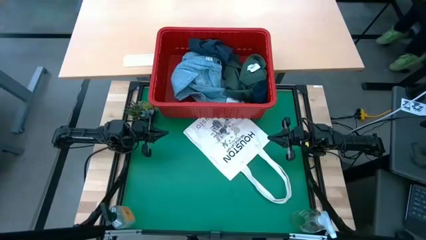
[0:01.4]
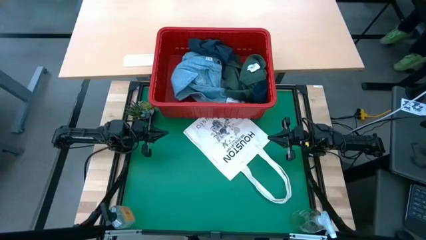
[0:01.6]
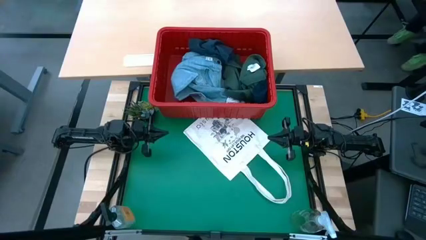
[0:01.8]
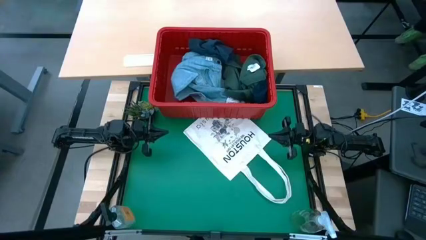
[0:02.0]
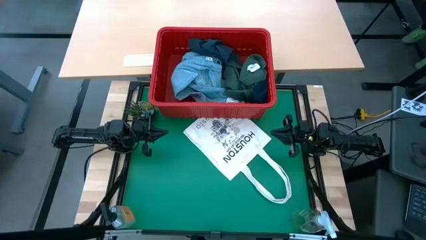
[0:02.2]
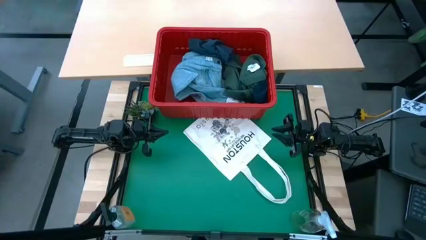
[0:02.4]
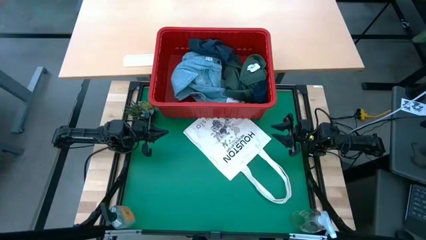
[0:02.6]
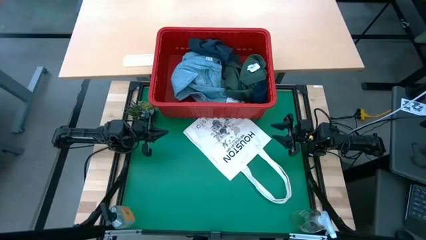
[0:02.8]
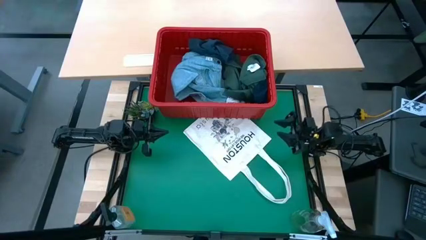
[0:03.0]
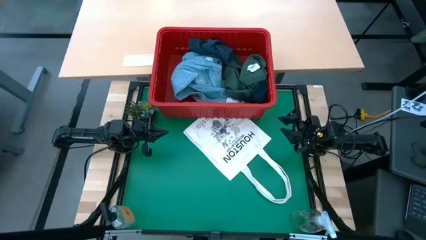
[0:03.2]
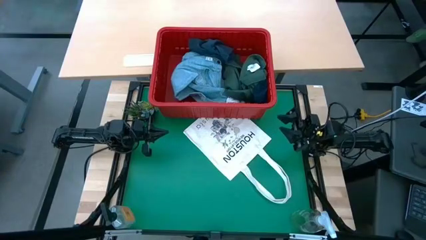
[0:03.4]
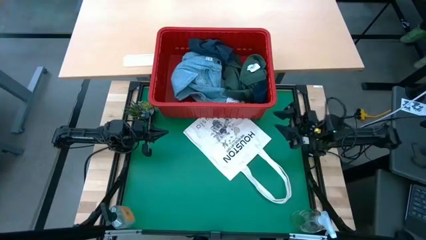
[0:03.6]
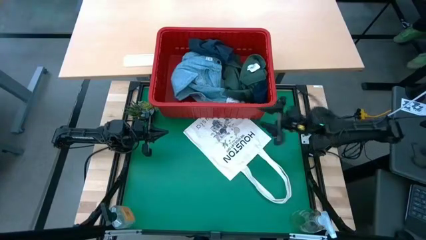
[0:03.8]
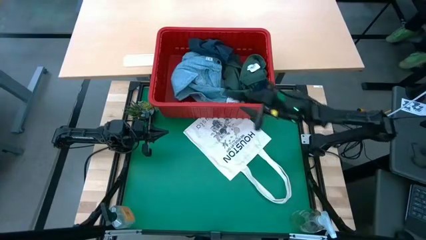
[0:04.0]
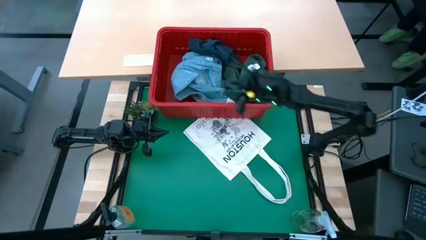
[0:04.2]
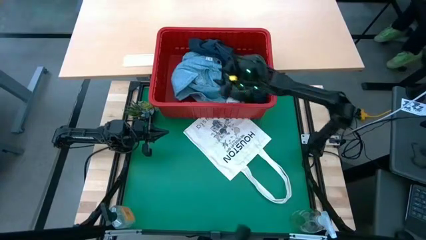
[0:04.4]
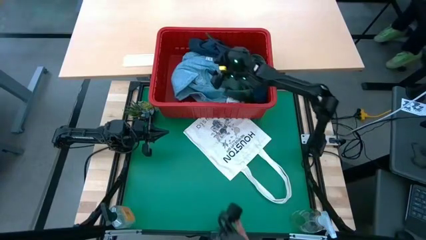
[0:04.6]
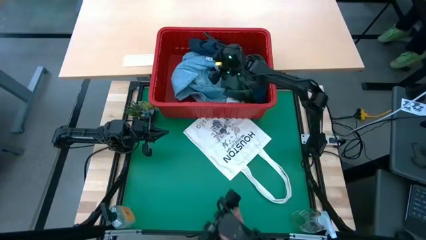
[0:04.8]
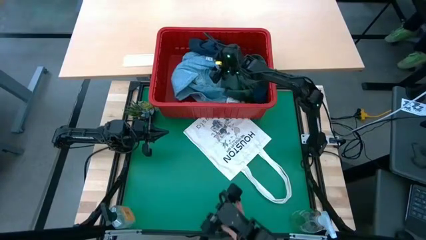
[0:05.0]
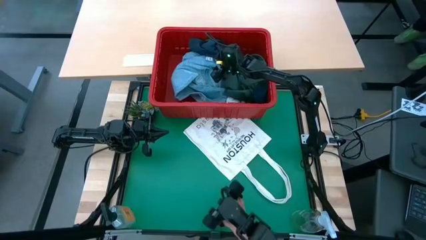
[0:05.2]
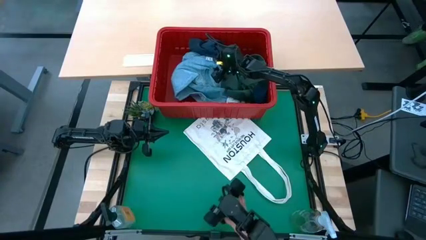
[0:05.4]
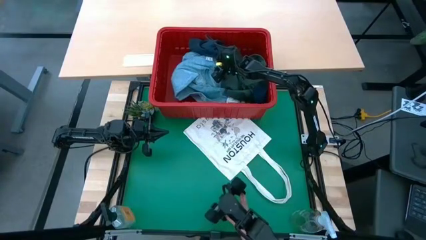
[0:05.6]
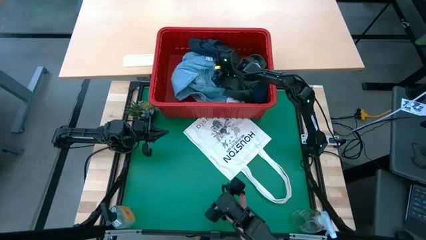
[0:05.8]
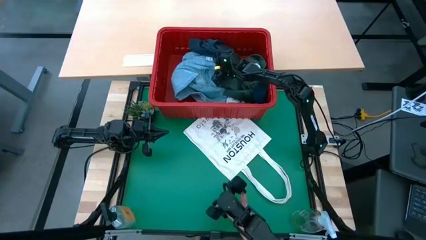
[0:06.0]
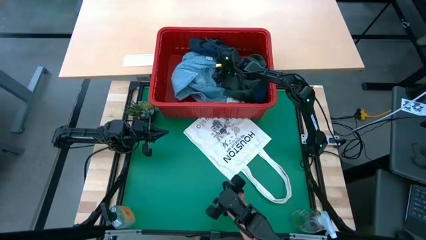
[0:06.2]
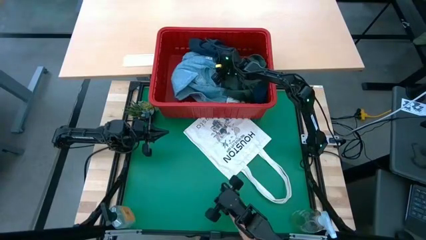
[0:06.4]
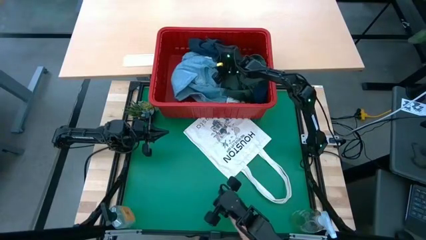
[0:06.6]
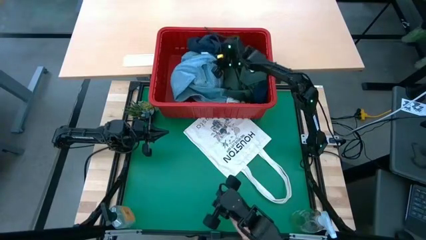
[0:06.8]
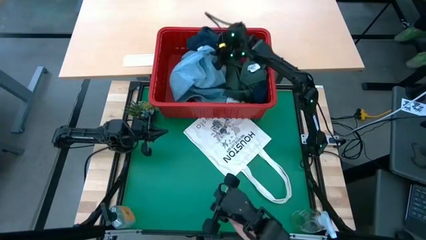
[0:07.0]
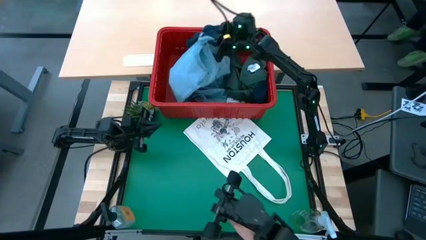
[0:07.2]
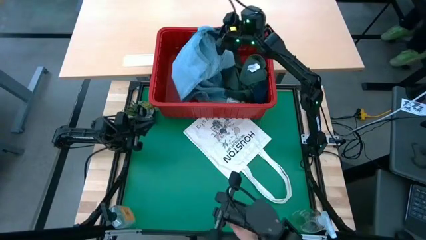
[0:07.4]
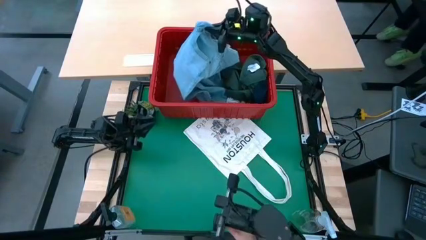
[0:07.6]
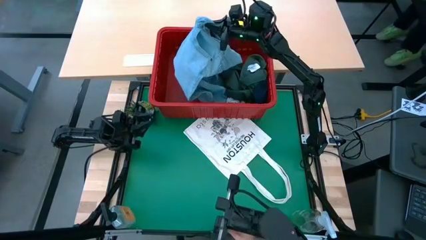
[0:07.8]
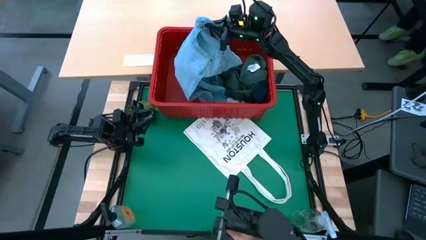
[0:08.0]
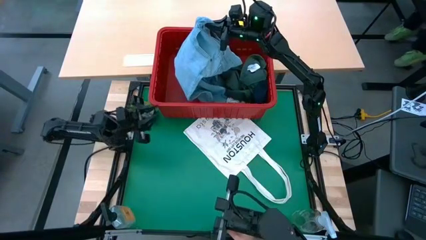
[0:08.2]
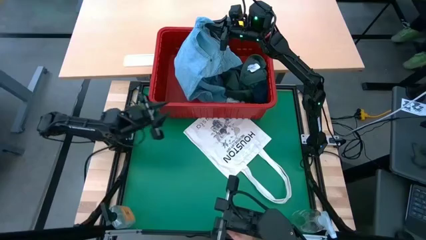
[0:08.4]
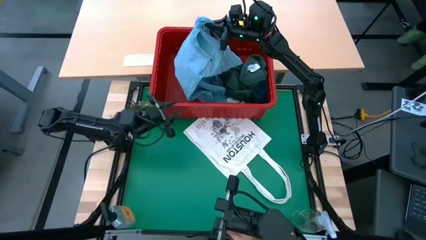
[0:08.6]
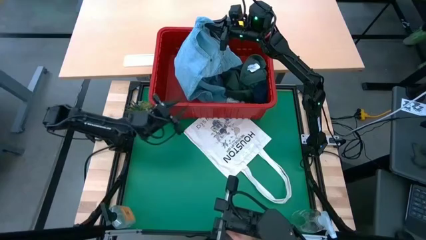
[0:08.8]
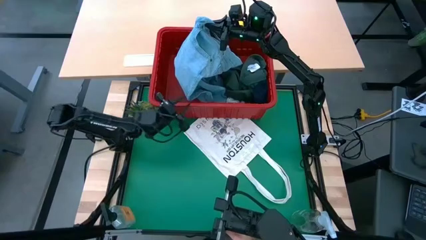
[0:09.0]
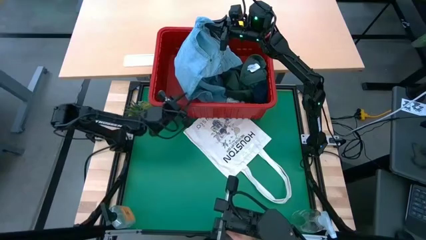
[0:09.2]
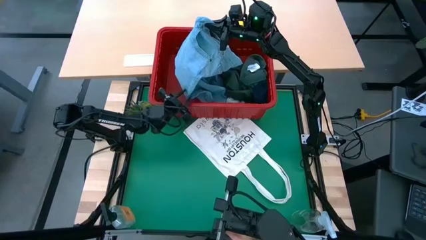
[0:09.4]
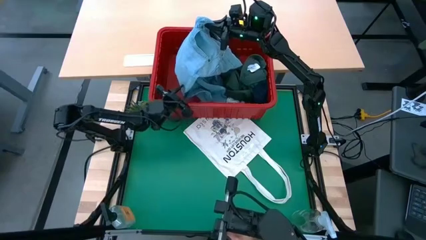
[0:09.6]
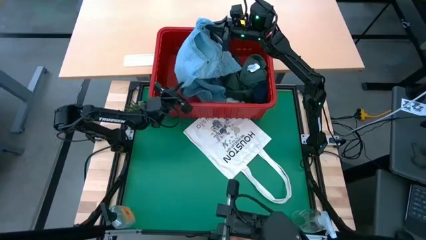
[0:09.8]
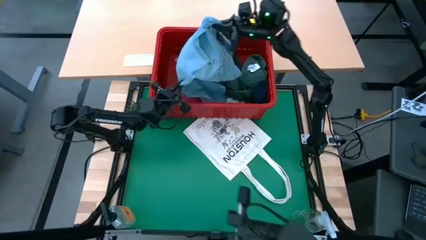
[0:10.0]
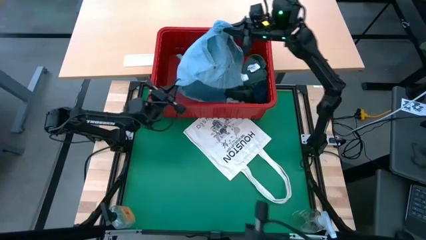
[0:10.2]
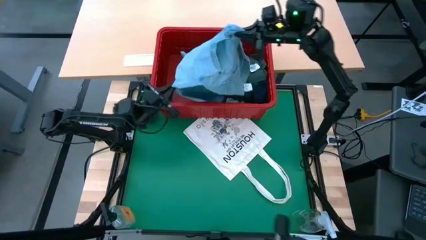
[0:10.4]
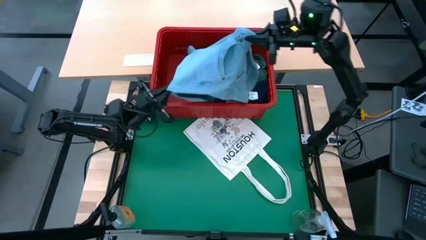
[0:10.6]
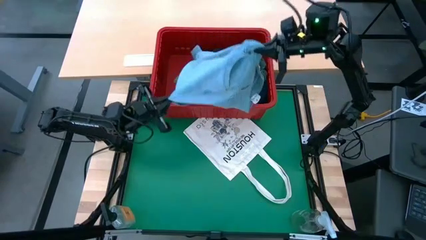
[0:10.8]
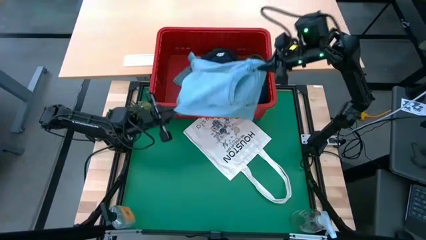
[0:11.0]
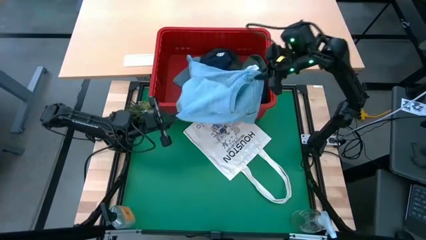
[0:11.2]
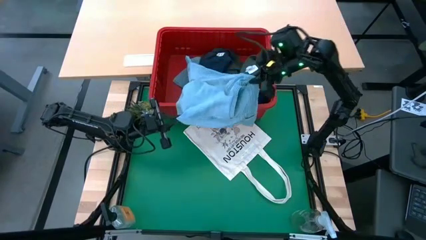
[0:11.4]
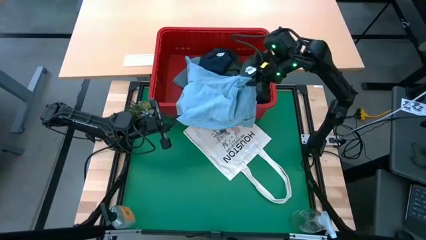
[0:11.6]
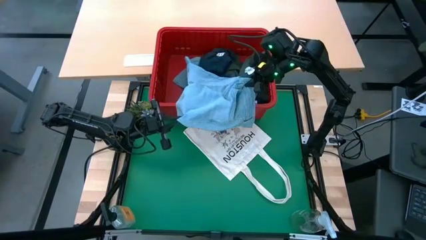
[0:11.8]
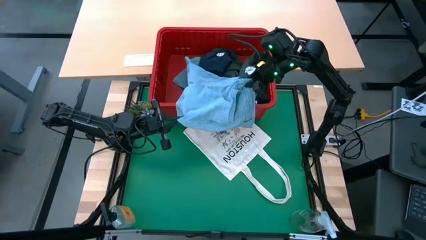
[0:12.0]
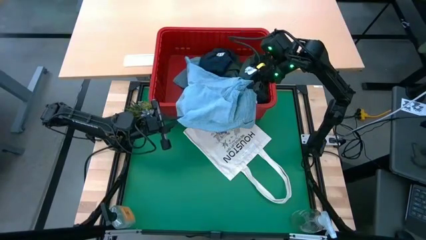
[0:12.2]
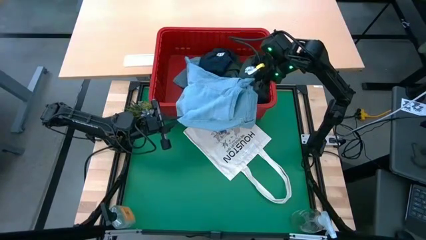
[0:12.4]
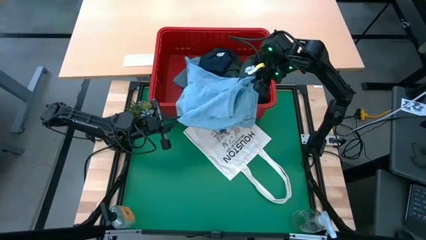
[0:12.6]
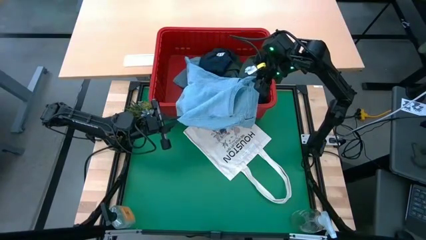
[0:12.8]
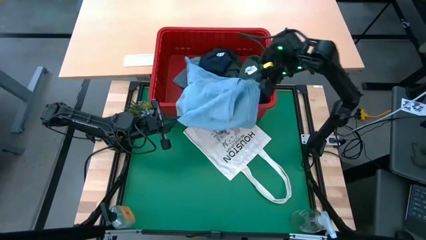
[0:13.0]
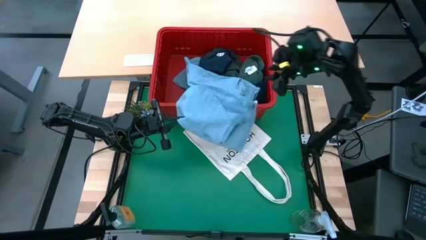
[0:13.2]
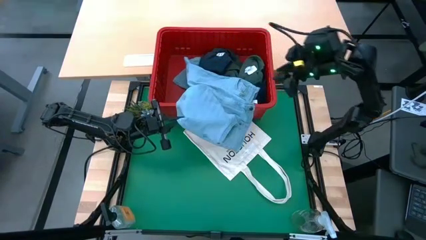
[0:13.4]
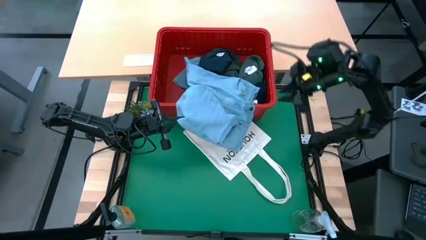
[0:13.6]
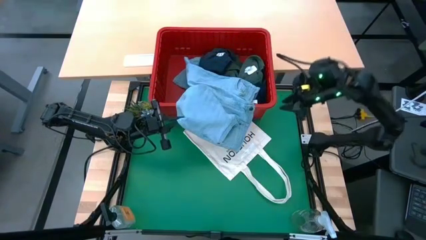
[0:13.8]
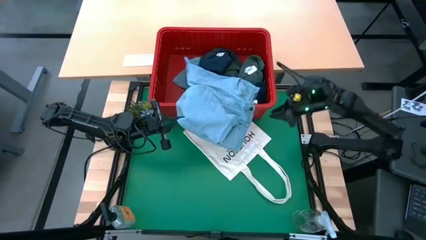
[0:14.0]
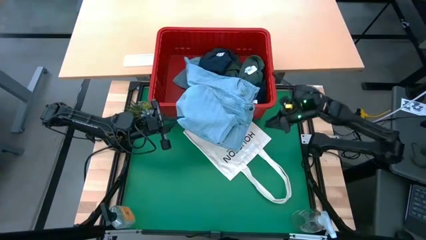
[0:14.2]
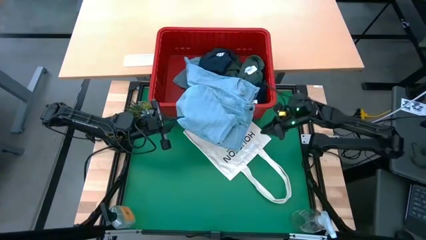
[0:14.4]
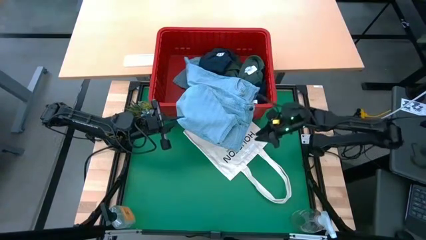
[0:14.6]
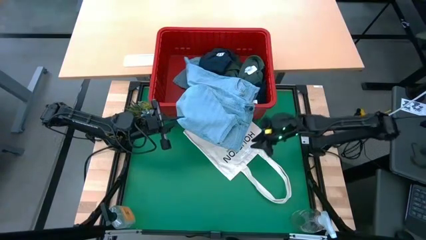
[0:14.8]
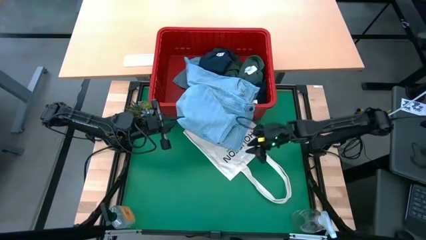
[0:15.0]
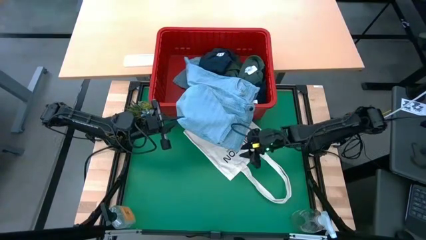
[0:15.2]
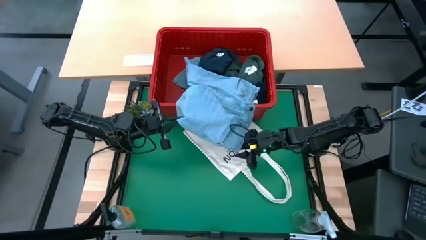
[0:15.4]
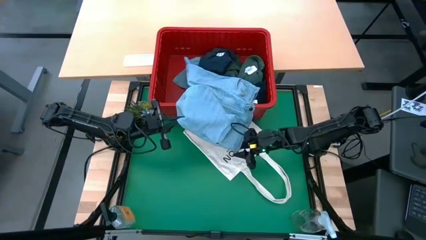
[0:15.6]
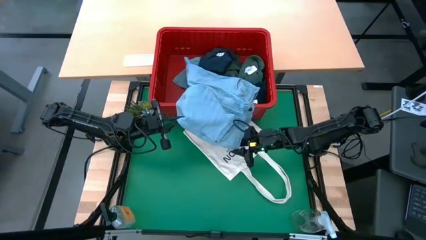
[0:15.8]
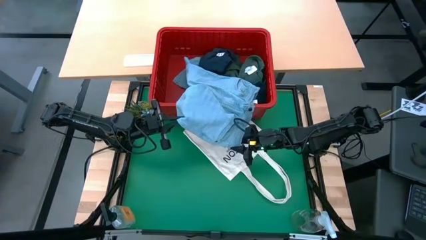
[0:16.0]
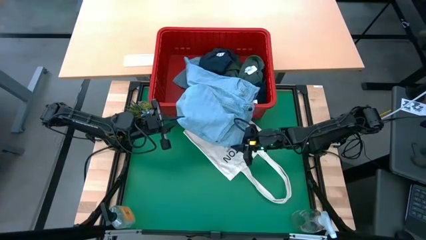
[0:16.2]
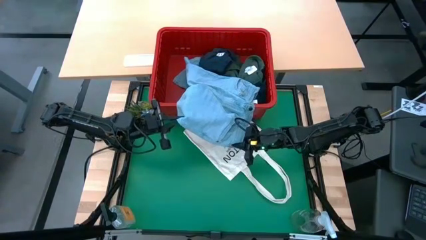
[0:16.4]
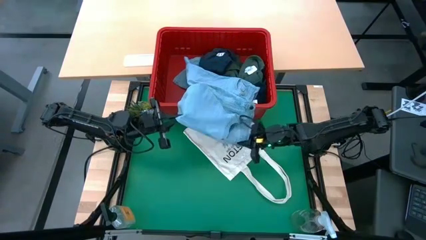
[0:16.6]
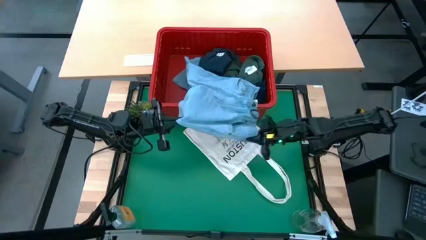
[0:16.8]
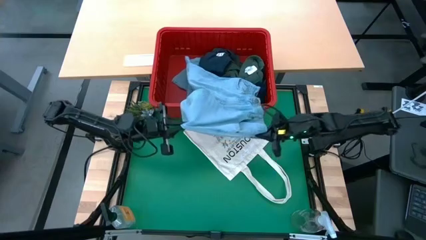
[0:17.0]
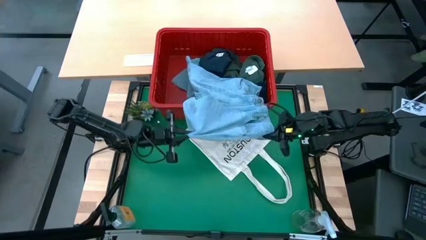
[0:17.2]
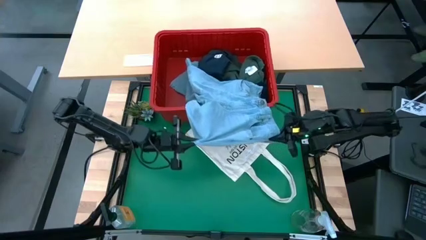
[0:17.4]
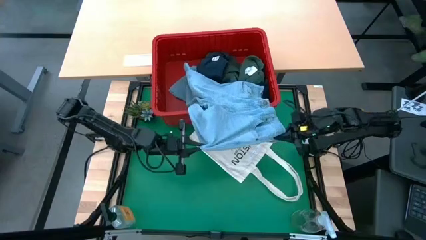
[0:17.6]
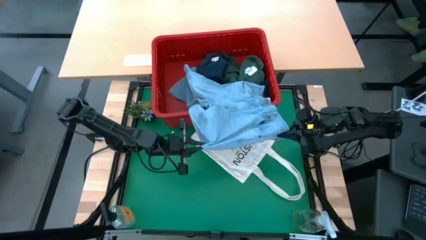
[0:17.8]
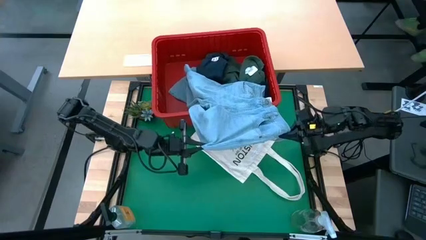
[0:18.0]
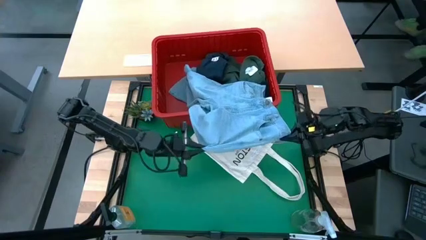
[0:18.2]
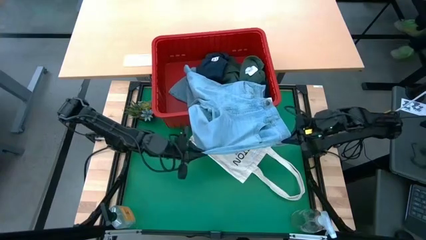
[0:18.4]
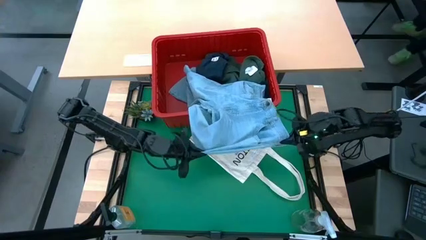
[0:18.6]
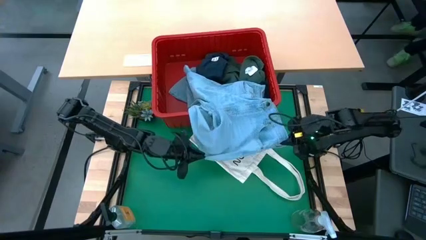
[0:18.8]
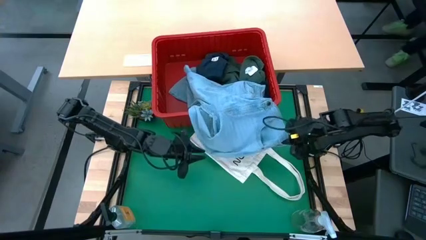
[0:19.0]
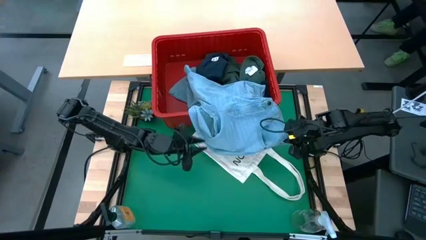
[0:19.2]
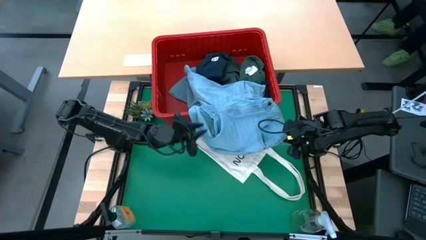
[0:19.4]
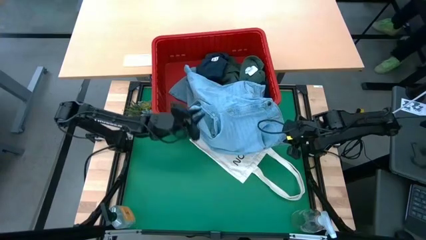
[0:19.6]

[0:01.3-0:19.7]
Task: Fold laundry
Fold the light blue pants
